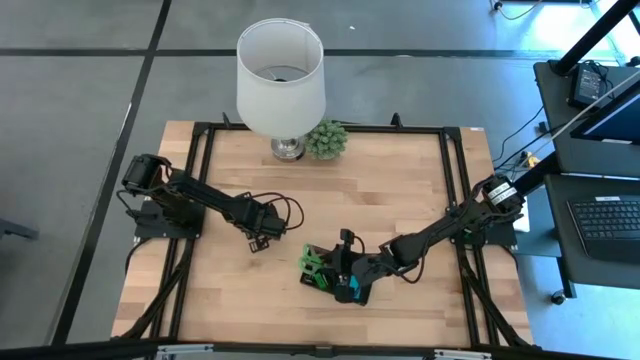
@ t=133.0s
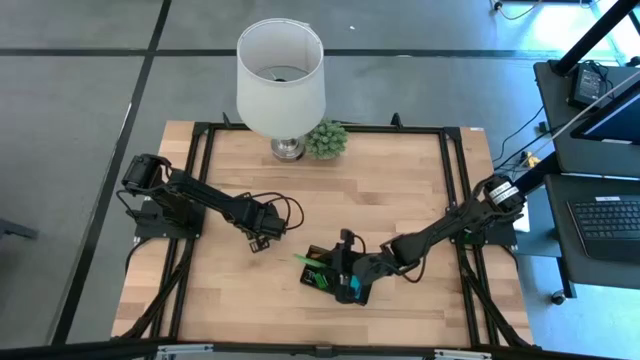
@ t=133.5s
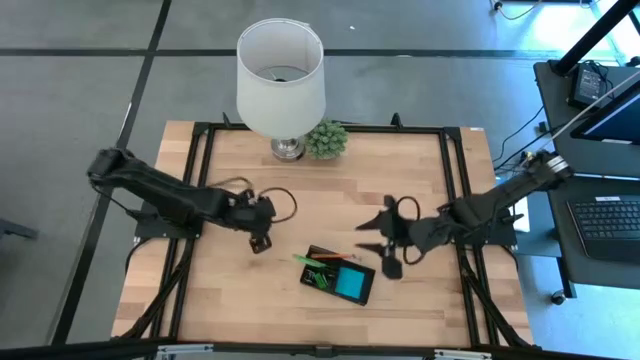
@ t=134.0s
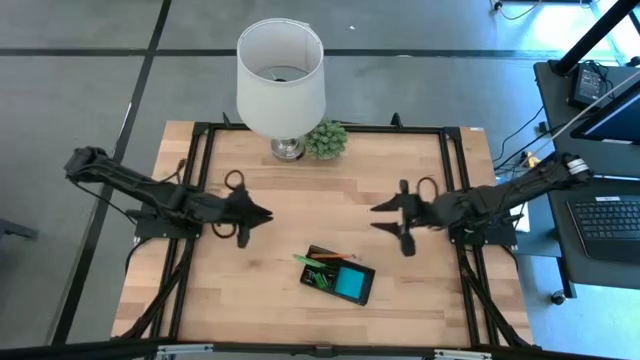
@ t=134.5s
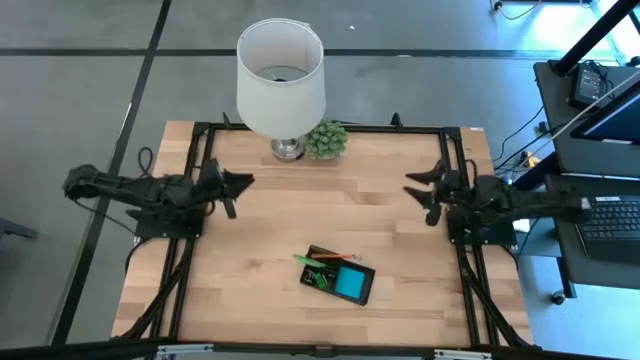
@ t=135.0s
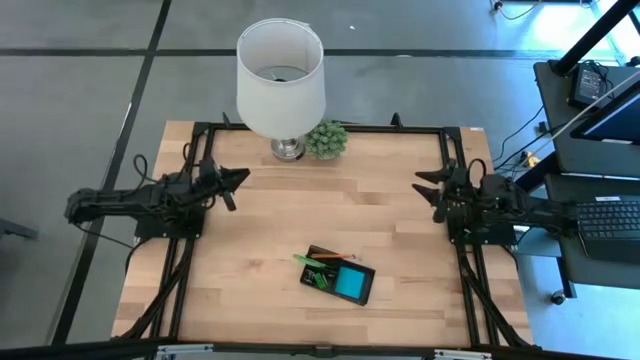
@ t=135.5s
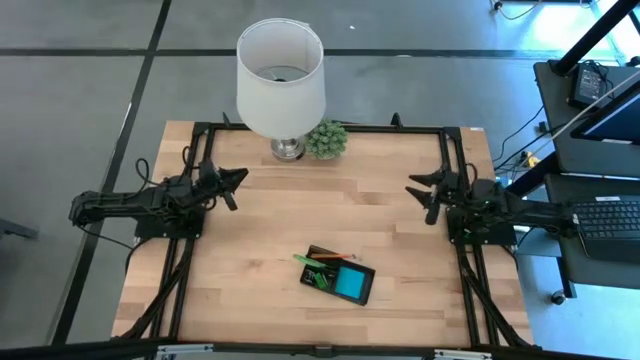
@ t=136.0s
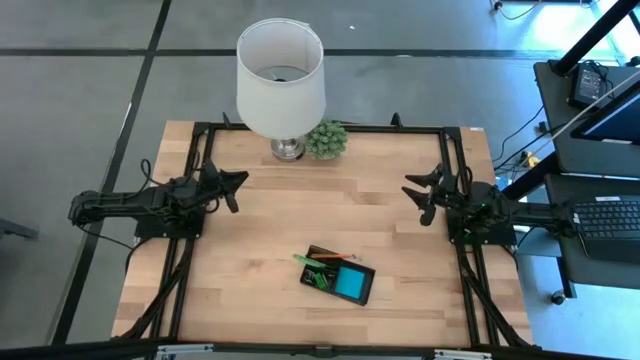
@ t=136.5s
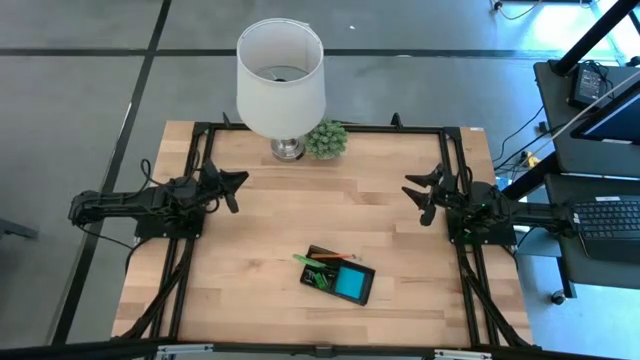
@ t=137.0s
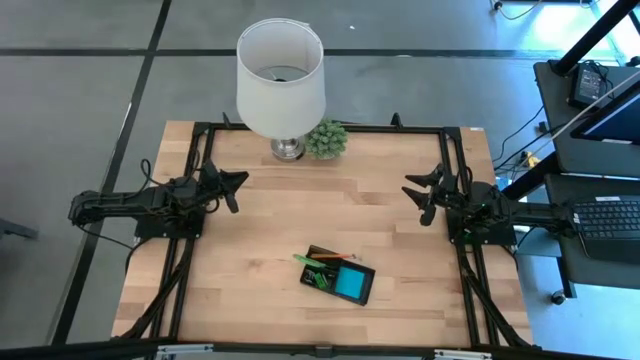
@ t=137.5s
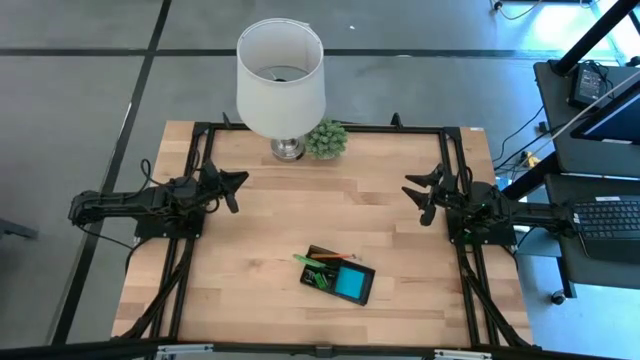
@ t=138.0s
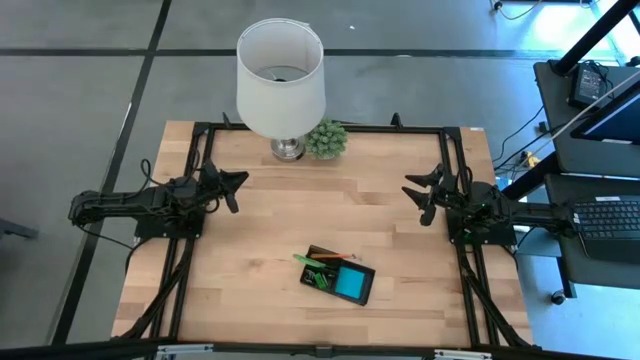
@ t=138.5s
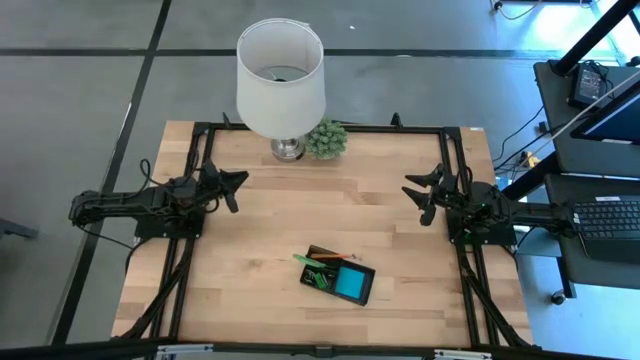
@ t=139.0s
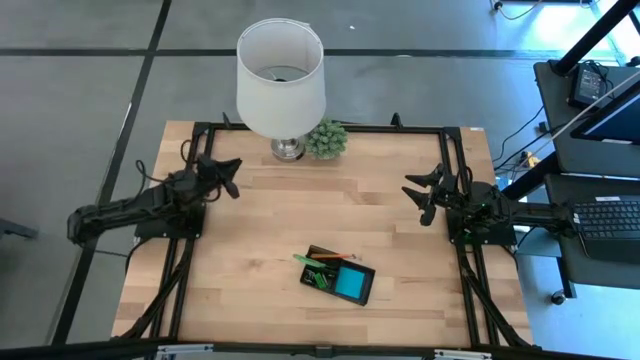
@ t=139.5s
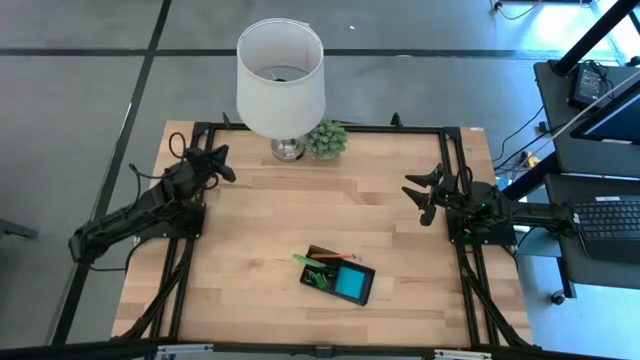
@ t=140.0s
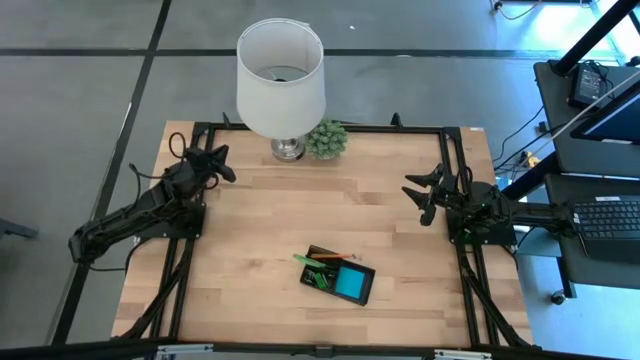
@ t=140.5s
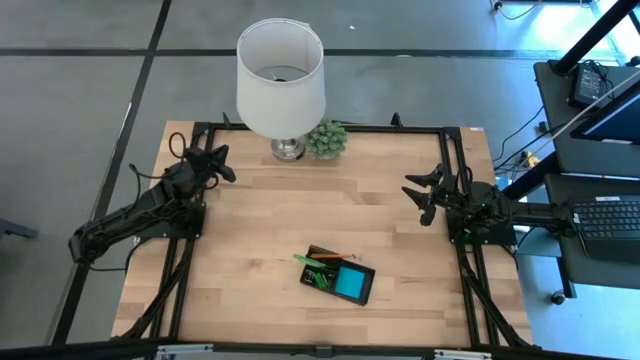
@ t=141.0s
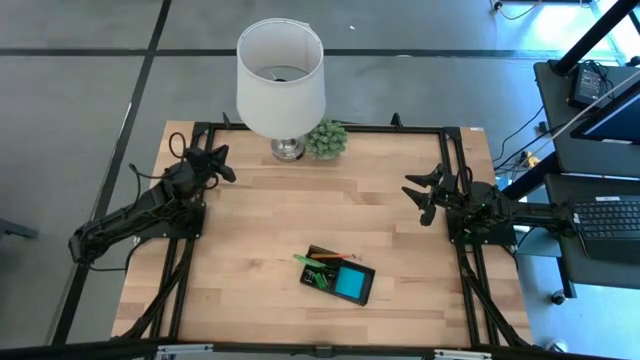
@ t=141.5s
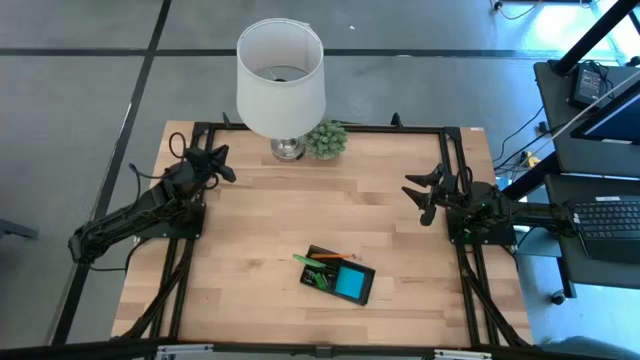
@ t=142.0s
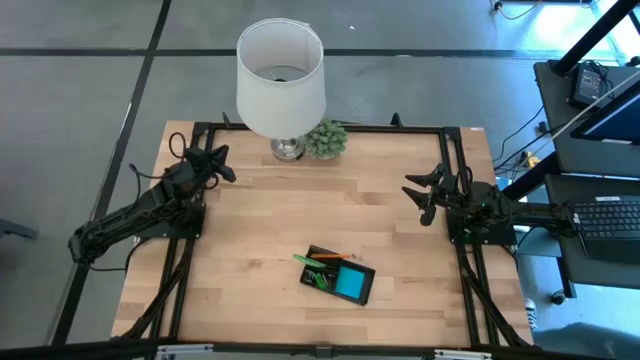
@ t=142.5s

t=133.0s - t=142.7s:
Task: Pick and place office supplies into organizer
Return to Home Position

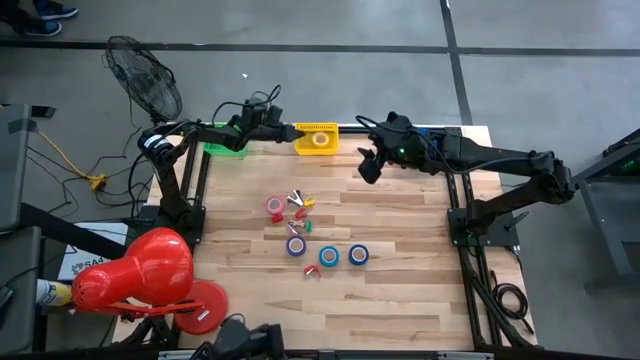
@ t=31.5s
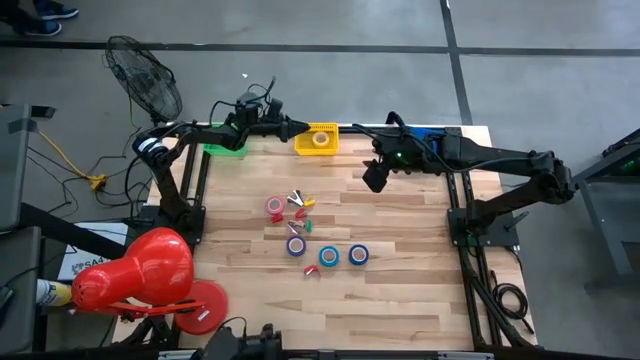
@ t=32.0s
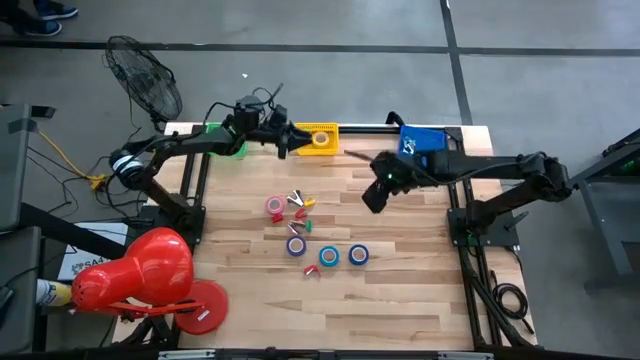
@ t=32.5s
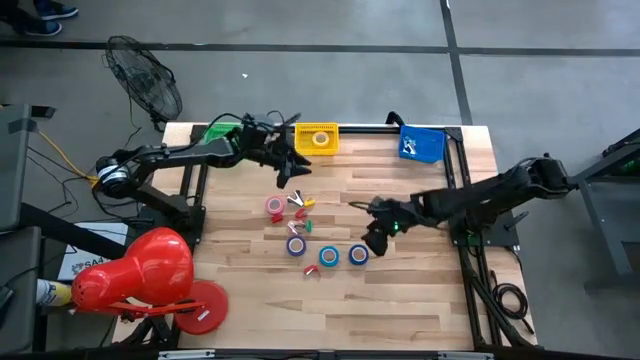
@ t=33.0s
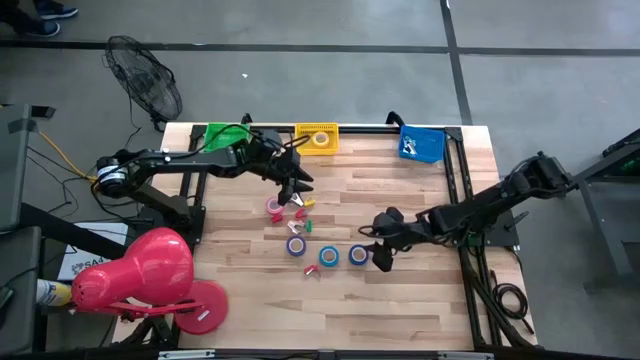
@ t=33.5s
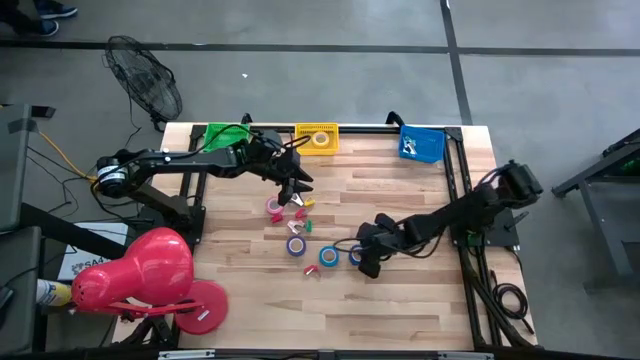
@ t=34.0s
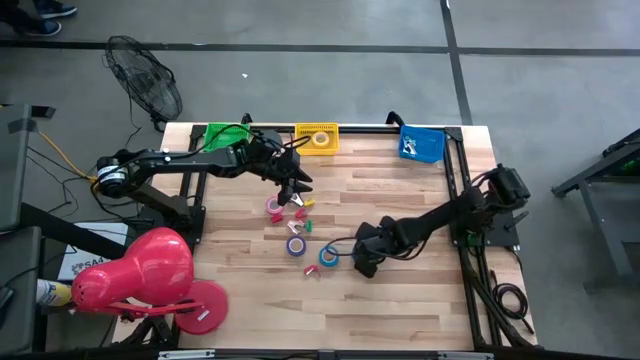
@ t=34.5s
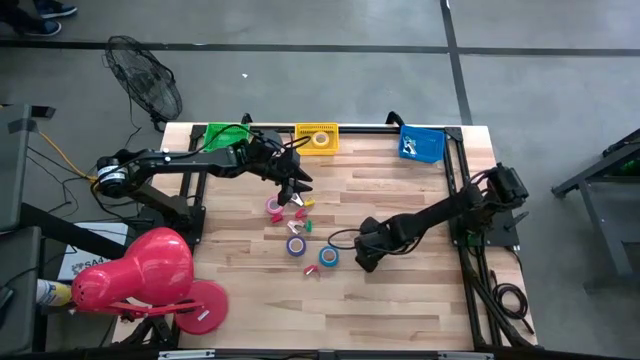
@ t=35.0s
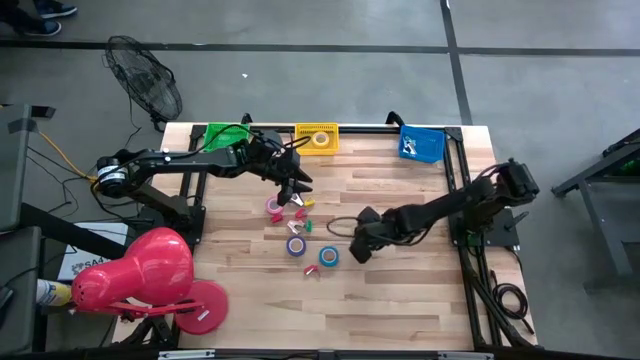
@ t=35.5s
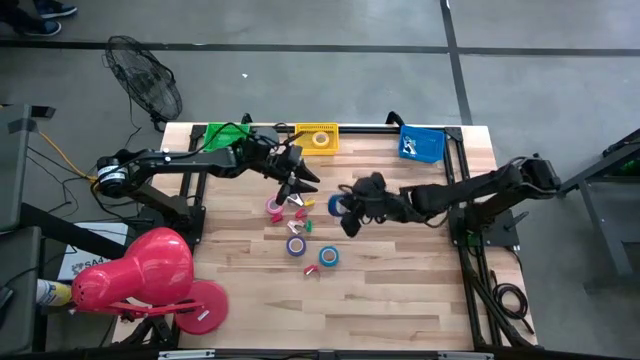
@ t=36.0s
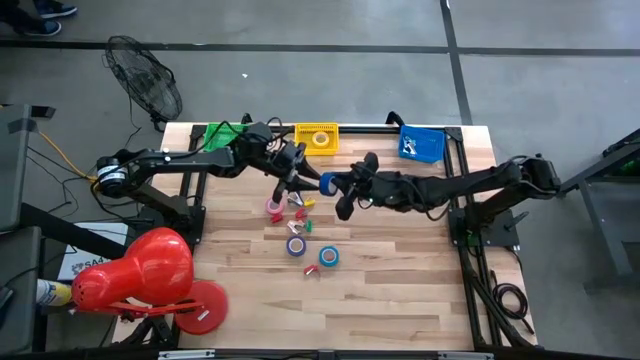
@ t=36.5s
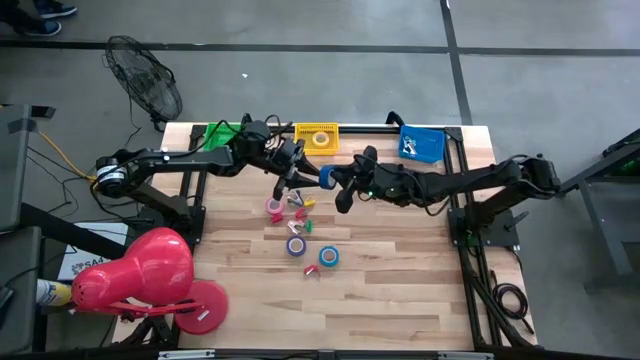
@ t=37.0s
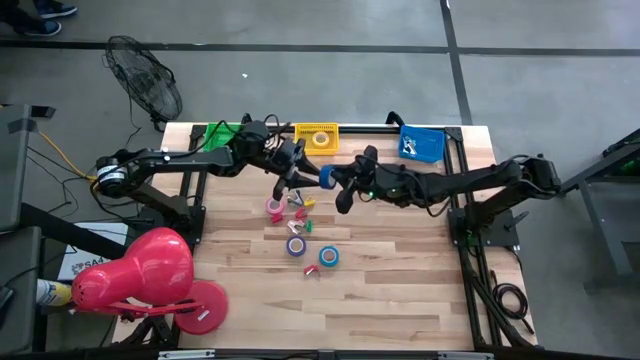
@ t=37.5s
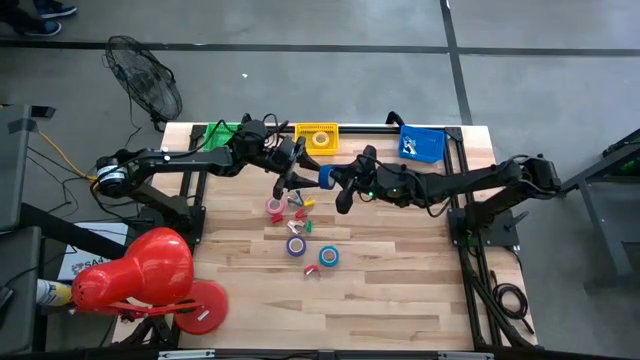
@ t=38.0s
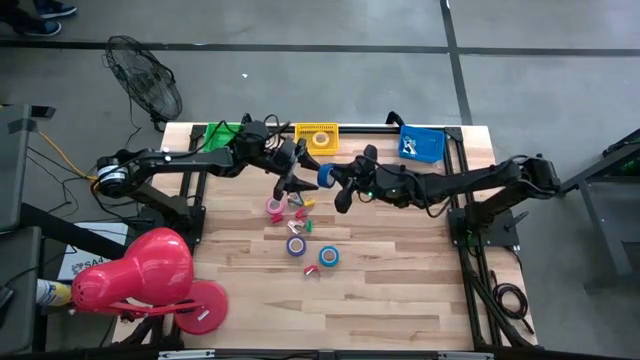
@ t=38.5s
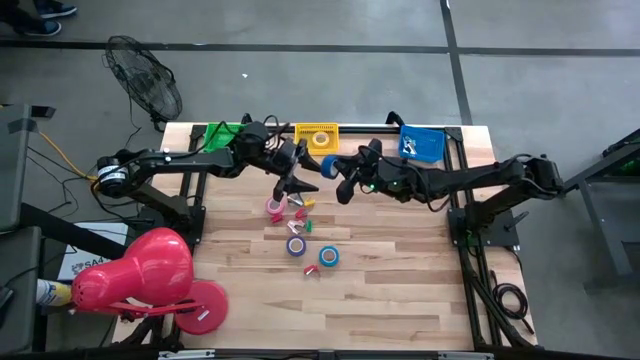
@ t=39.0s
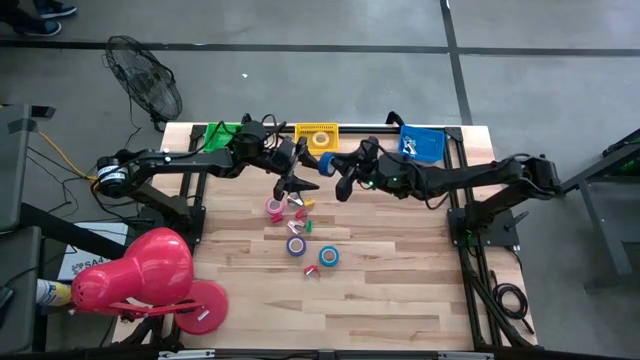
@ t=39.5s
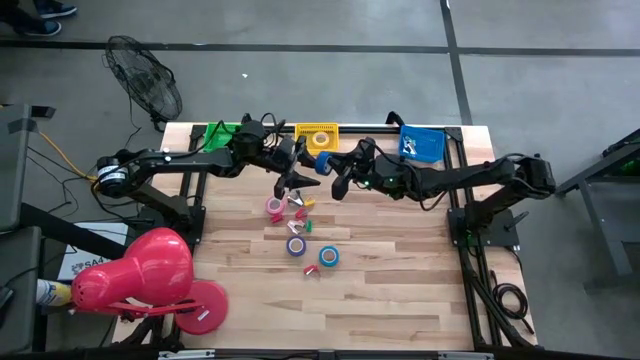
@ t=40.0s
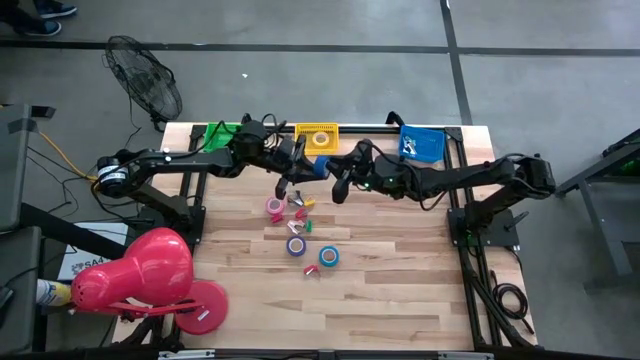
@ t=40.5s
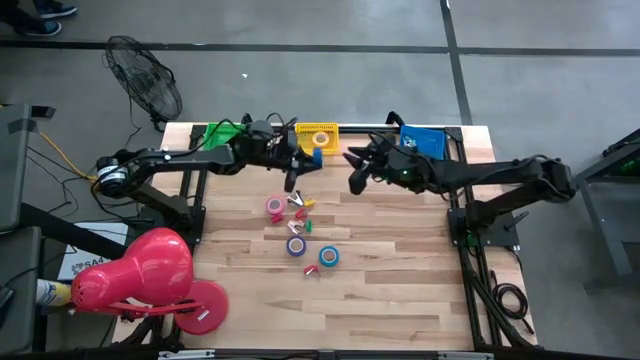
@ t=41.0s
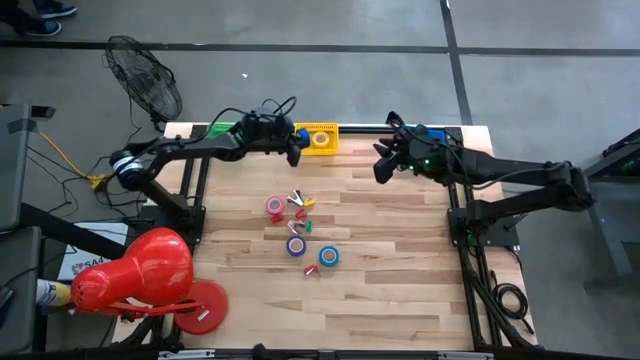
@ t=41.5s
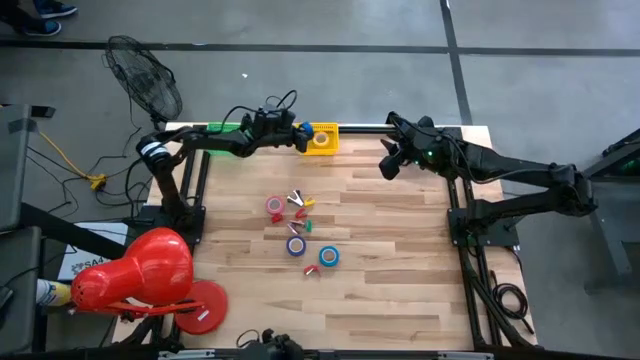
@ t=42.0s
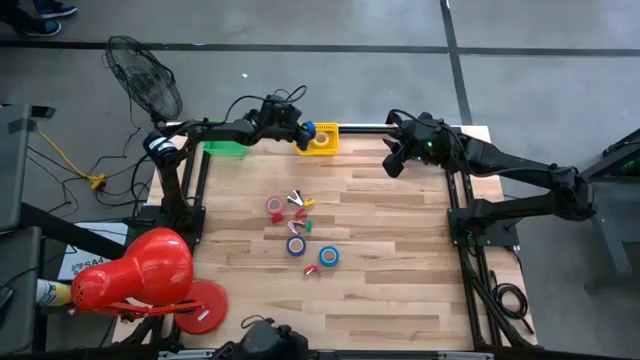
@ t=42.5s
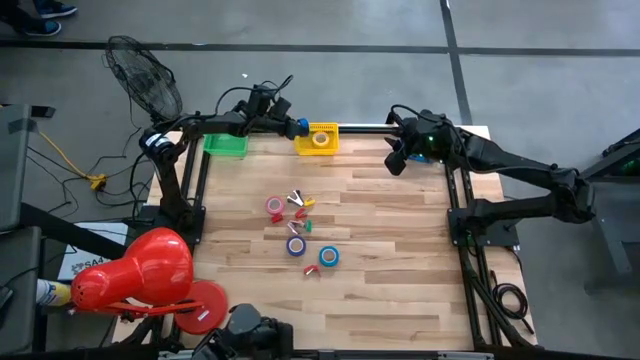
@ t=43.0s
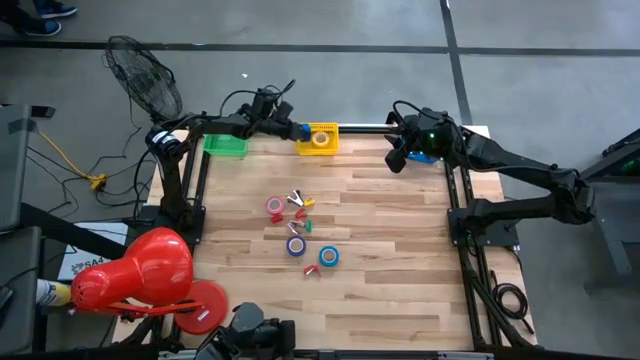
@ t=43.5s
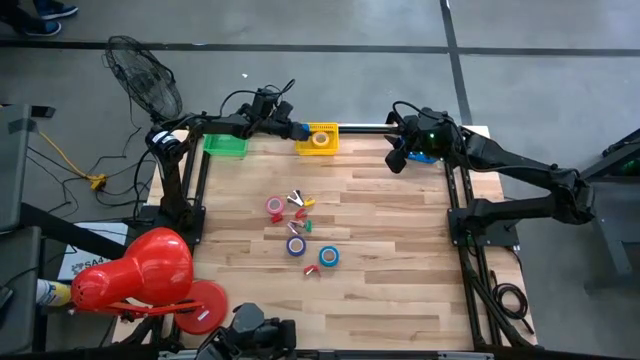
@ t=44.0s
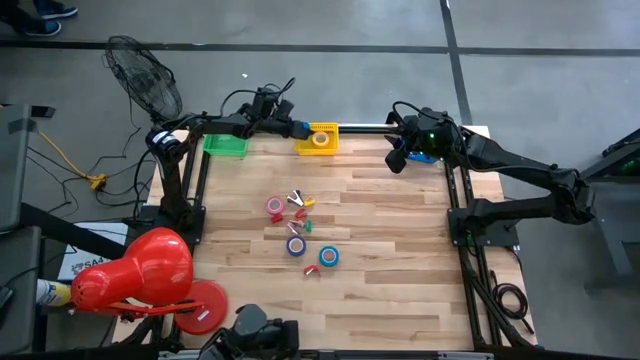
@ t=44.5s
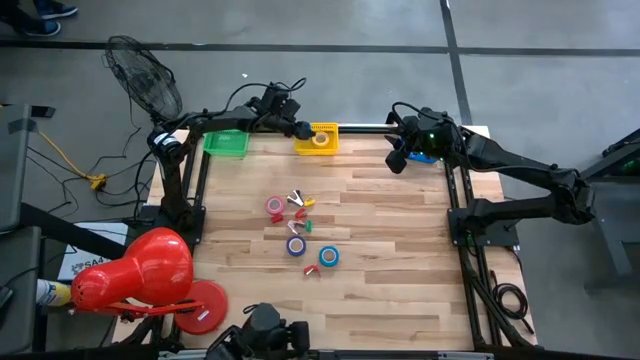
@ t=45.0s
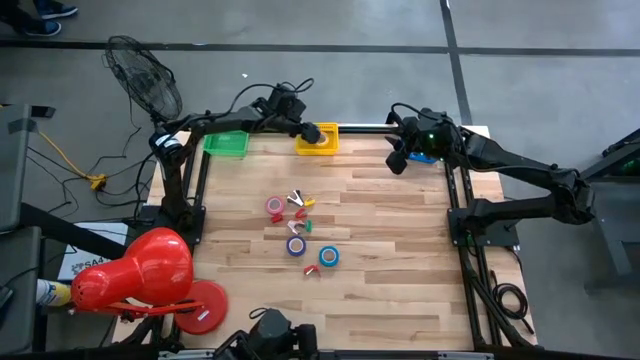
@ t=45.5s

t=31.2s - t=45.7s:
Task: Pick and place Stapler, Stapler remover, tape
Put the blue tape into the yellow bin
